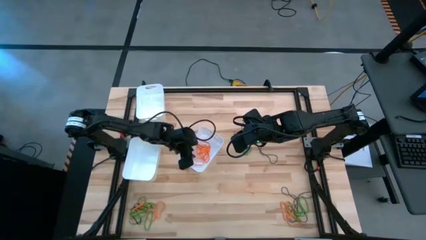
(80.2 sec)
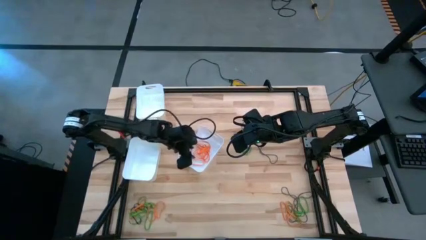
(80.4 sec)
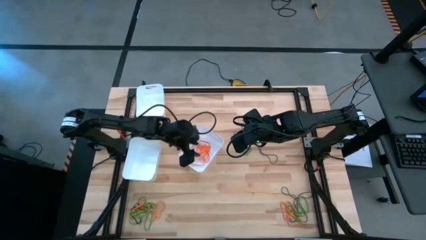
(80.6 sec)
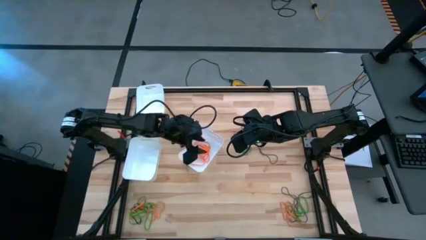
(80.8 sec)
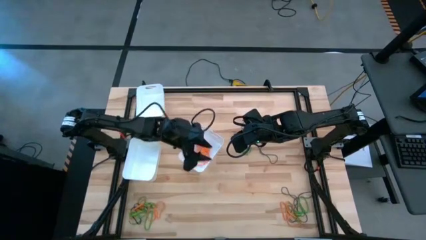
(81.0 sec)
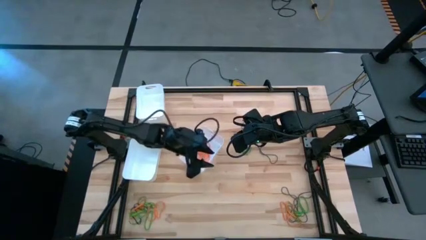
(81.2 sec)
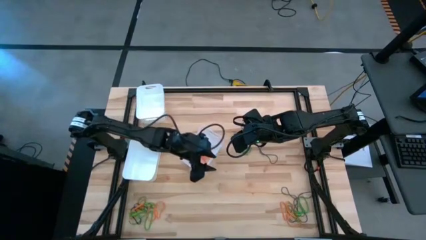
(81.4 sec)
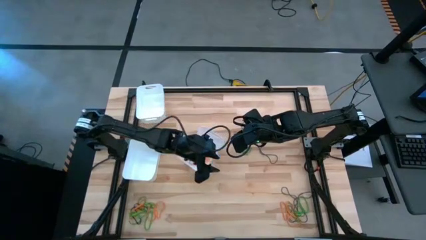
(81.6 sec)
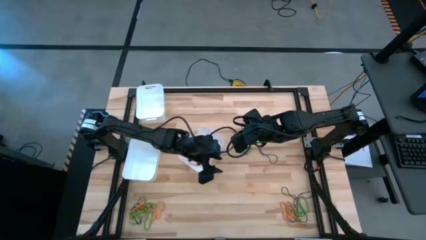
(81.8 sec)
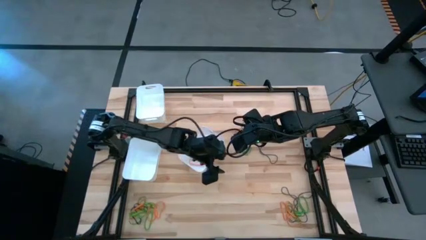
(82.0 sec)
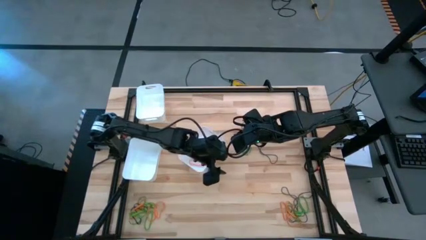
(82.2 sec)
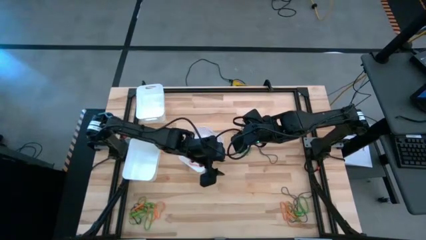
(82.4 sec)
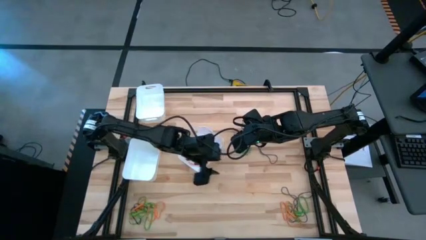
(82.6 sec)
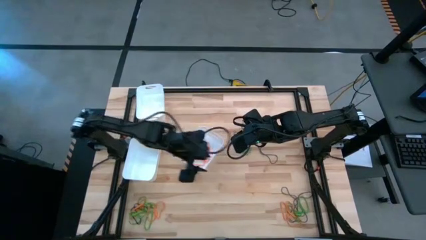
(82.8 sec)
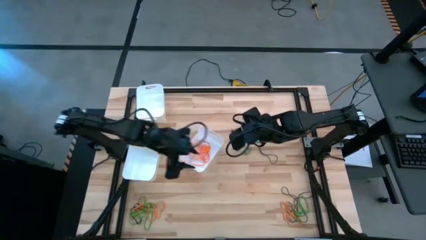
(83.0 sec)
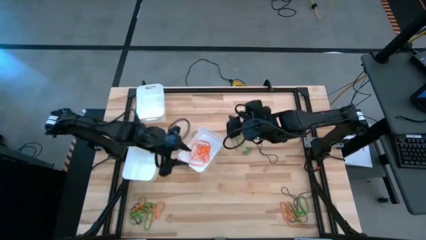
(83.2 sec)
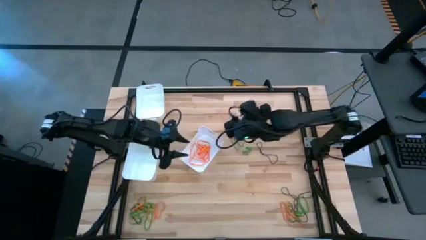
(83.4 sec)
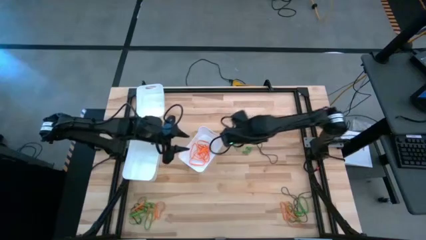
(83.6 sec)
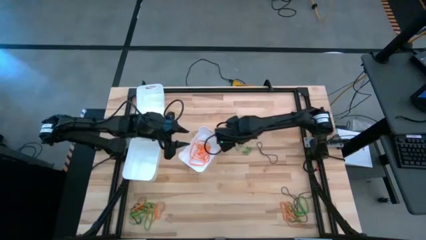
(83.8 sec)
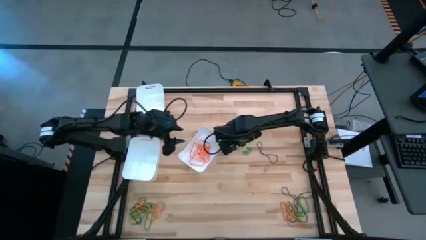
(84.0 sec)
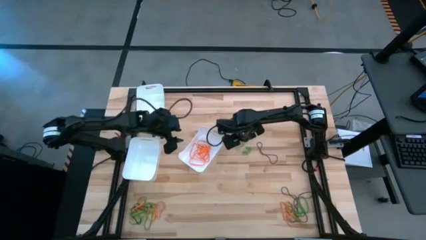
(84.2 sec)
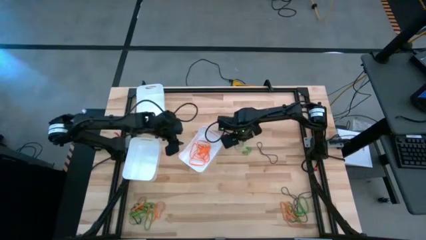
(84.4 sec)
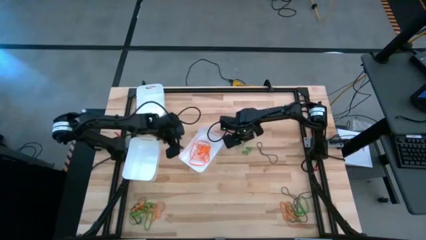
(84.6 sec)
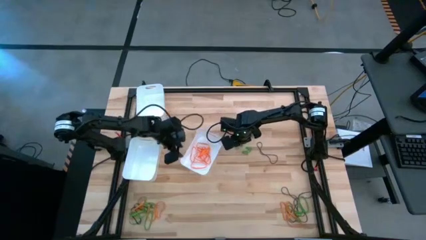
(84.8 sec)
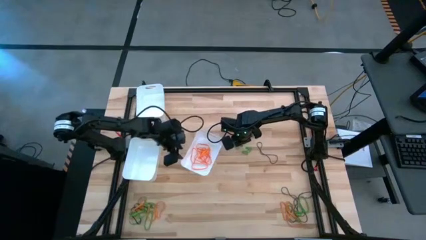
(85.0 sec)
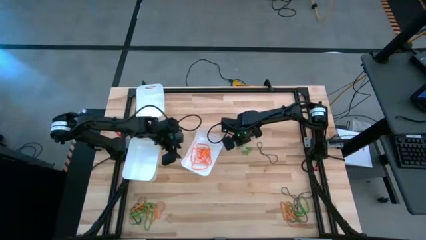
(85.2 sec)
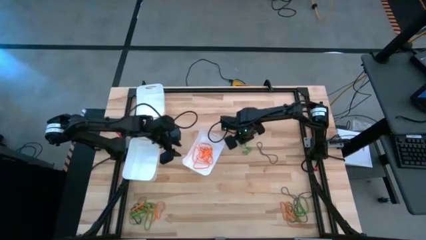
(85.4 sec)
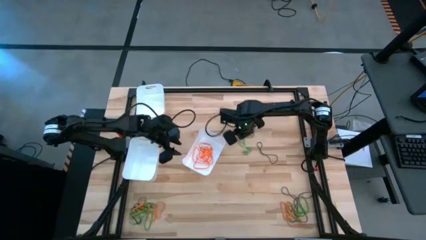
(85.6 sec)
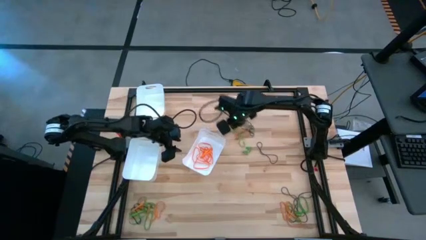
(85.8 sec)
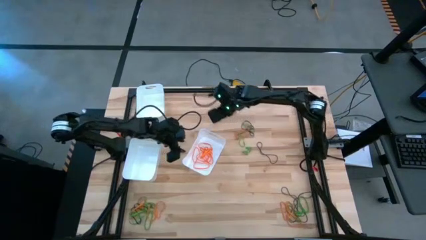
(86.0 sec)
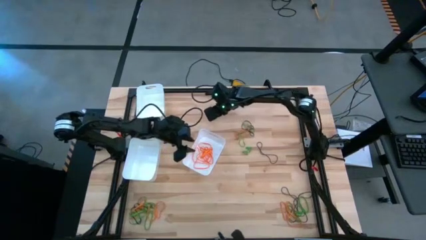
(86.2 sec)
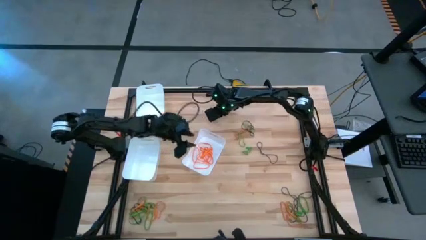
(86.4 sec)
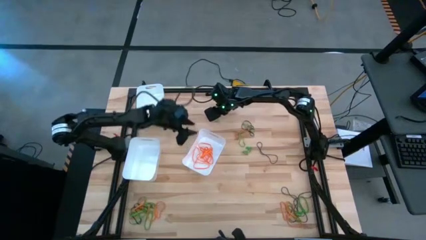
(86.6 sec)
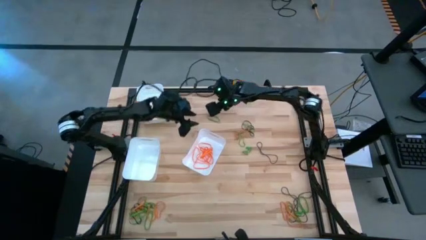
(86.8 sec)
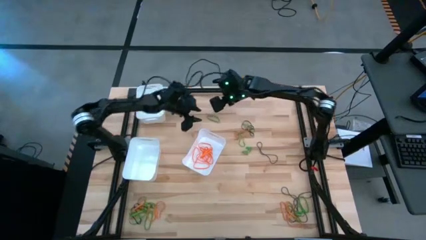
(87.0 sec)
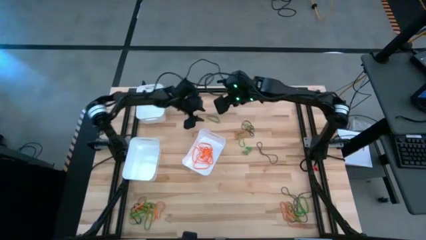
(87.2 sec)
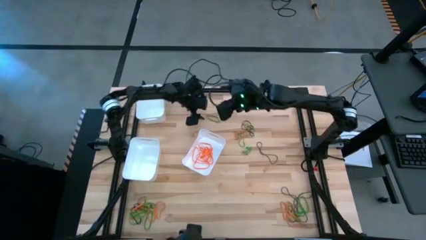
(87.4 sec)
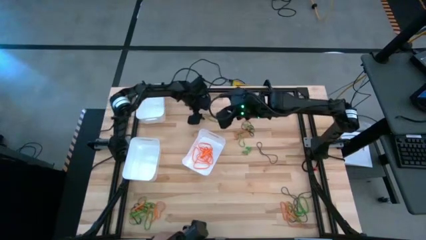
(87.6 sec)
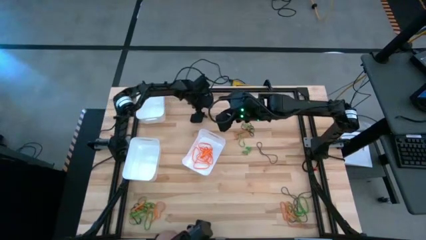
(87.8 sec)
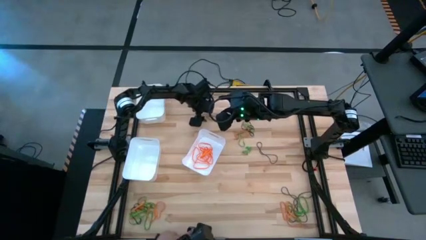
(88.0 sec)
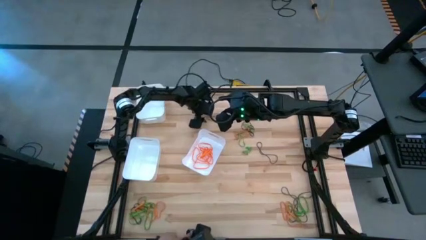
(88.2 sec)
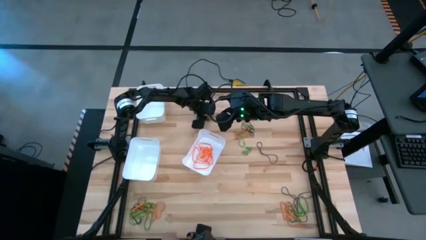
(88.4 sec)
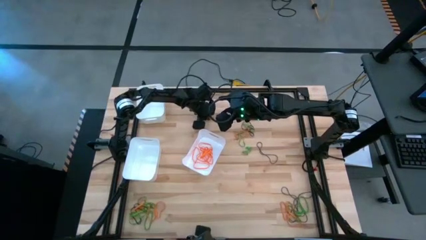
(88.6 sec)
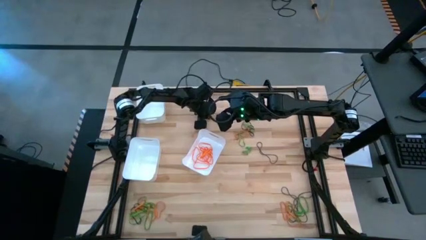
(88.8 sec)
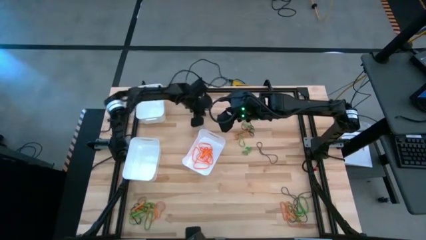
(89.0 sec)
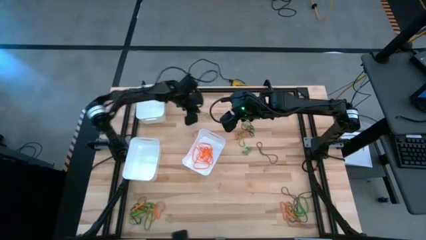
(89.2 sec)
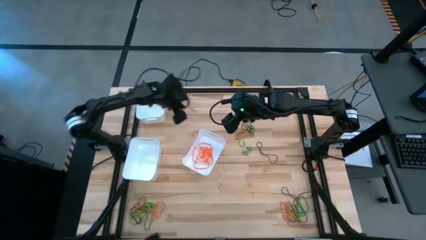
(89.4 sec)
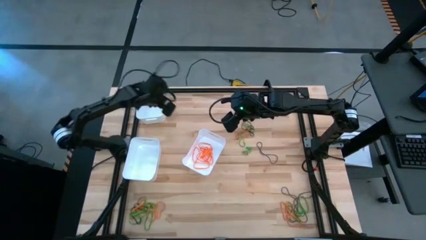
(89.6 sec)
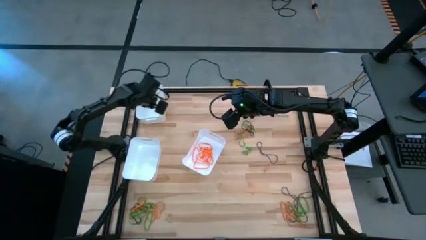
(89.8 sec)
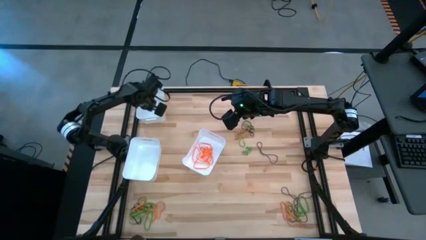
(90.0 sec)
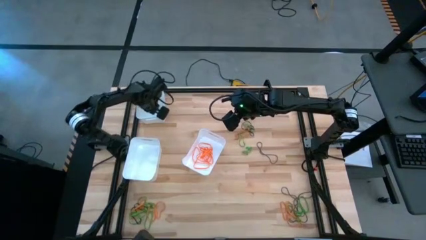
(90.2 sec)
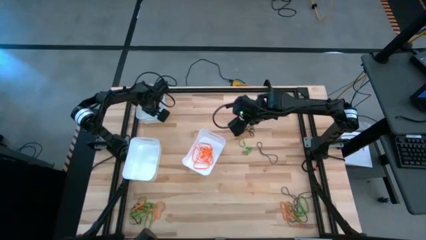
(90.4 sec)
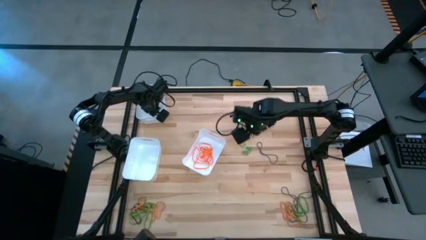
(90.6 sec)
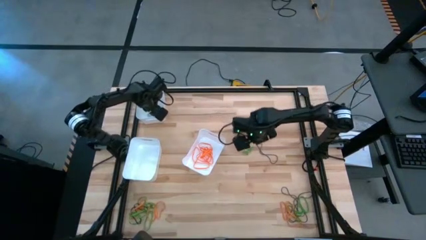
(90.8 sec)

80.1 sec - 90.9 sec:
Task: Sort rubber bands into baskets
Put the green rubber band into the top white bin

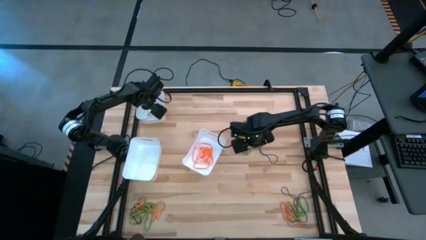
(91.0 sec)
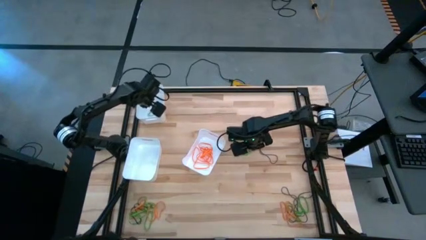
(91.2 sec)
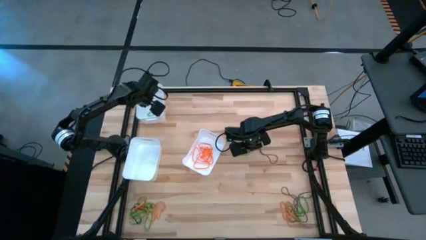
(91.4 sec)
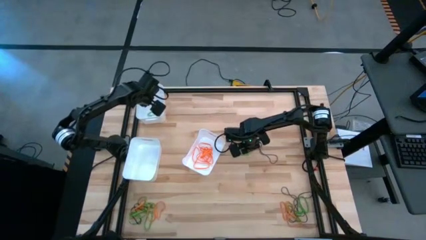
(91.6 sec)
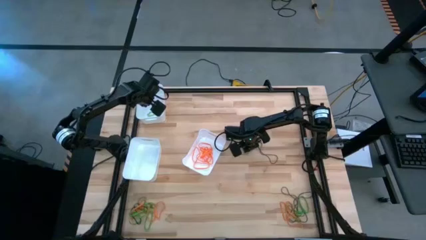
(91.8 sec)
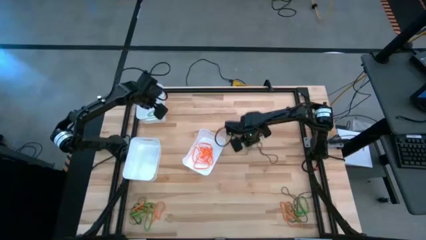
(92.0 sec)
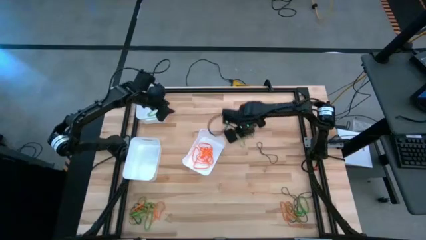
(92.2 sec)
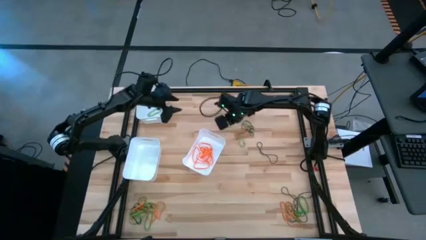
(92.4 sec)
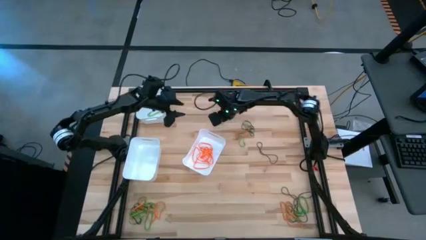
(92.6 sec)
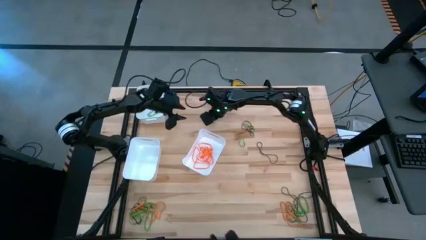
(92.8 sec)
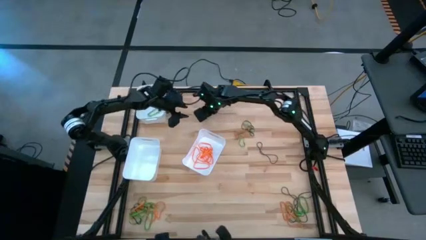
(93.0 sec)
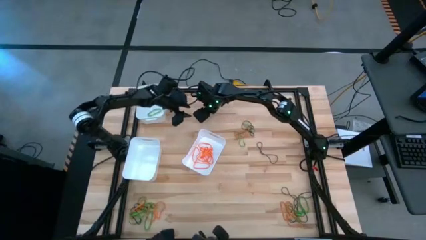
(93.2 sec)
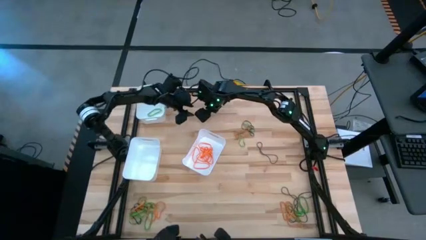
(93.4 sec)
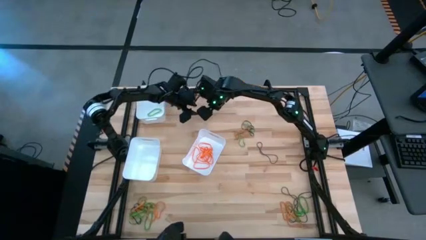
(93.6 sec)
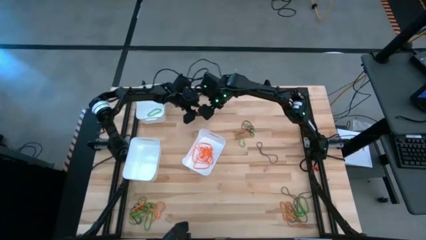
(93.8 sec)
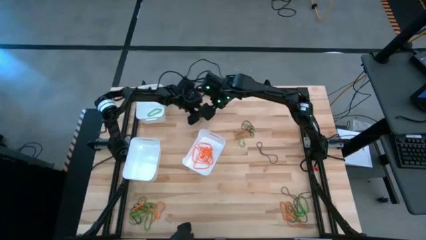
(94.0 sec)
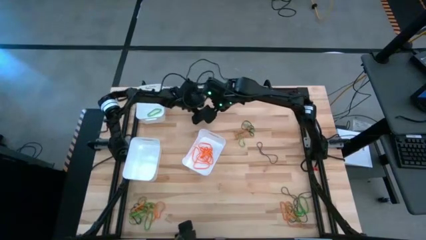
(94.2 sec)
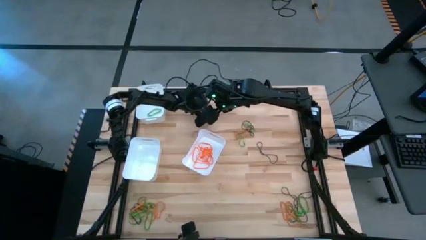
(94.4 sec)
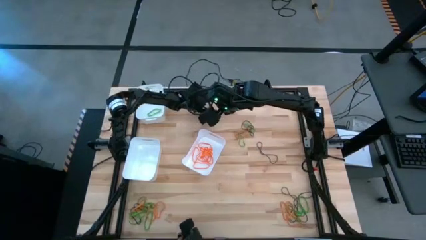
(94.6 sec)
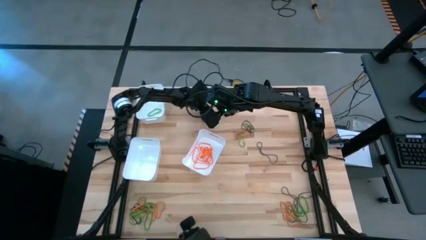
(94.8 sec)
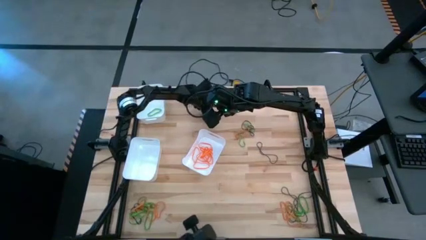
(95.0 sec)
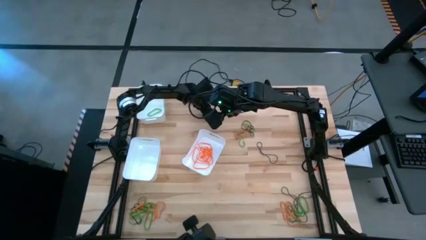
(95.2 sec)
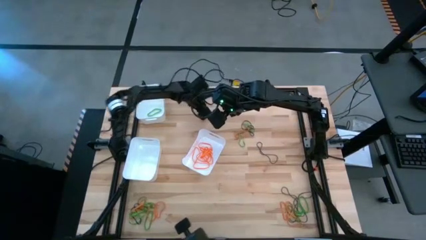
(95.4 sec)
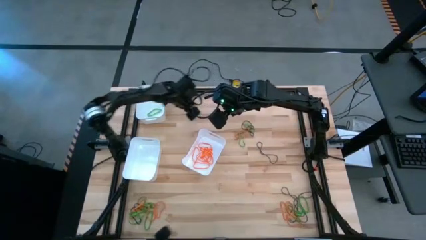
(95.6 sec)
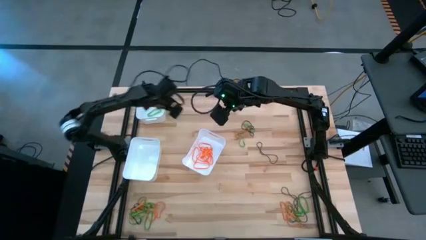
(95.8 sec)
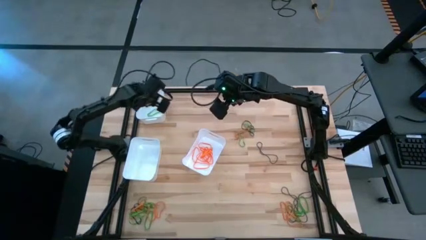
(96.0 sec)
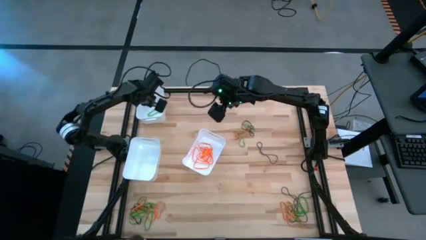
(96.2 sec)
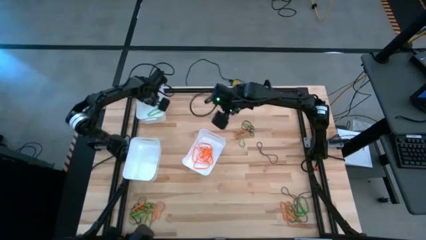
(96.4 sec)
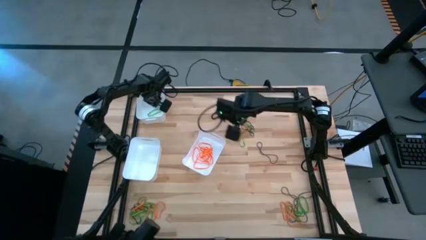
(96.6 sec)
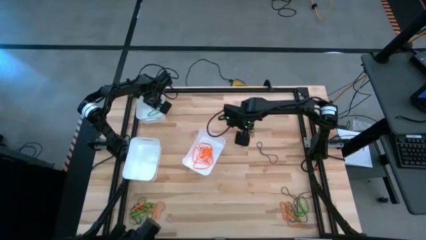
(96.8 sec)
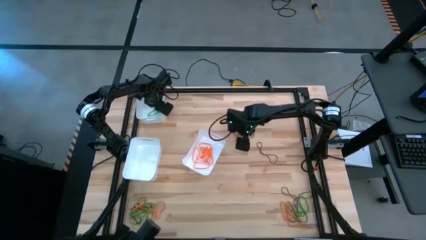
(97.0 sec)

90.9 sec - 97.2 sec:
Put the green rubber band into the top white bin
